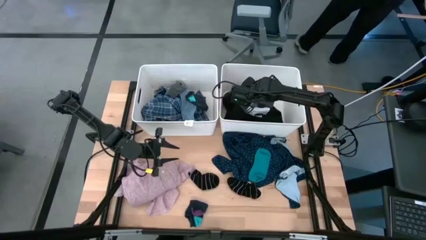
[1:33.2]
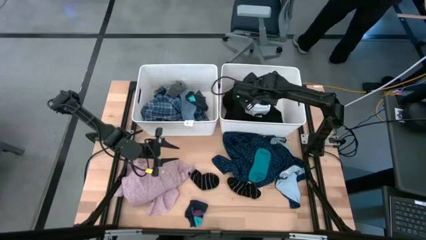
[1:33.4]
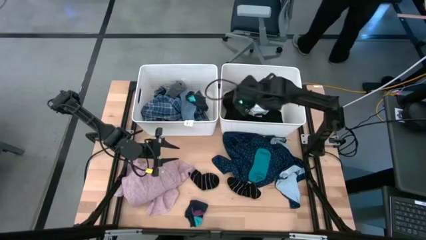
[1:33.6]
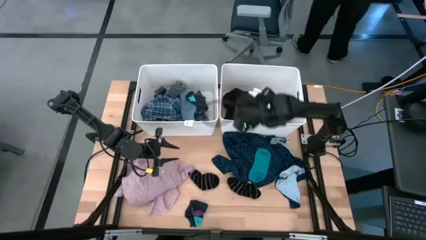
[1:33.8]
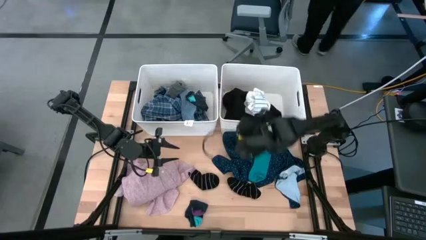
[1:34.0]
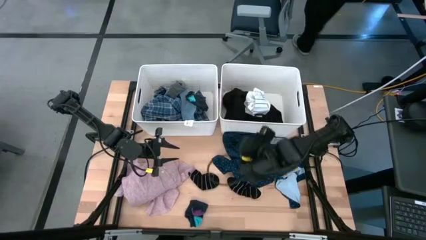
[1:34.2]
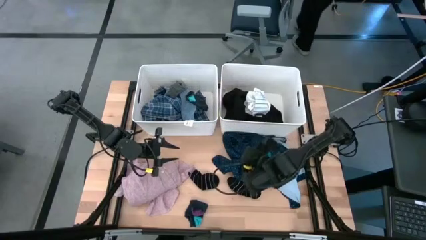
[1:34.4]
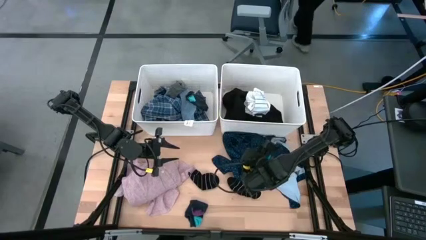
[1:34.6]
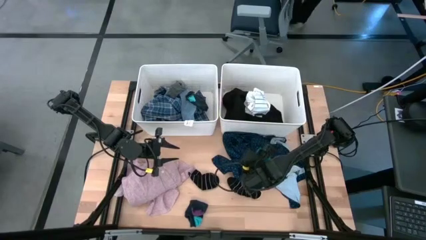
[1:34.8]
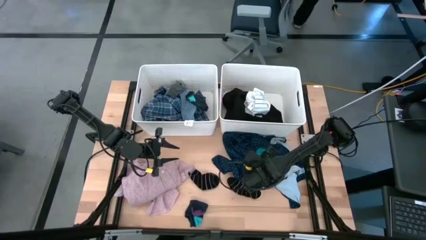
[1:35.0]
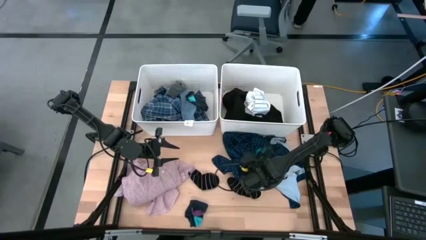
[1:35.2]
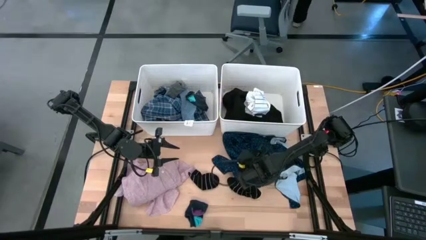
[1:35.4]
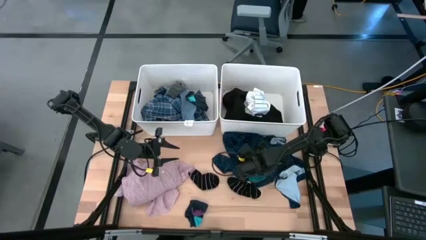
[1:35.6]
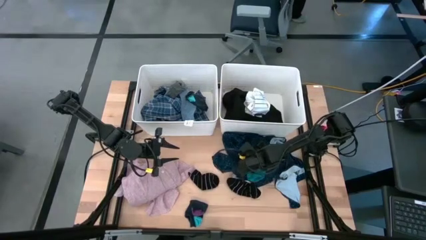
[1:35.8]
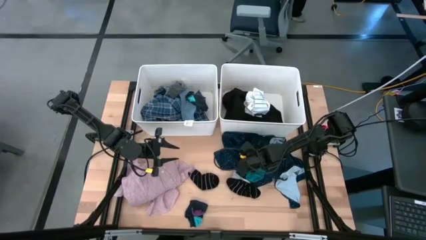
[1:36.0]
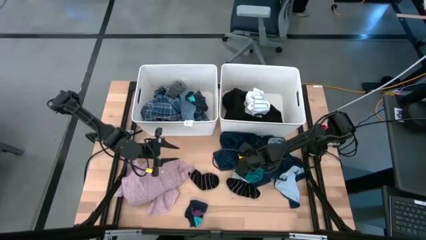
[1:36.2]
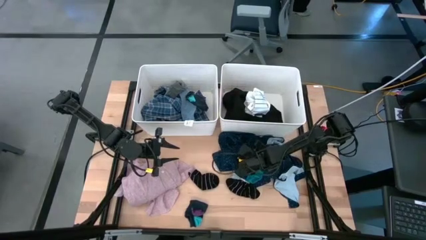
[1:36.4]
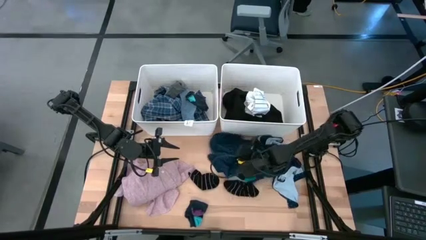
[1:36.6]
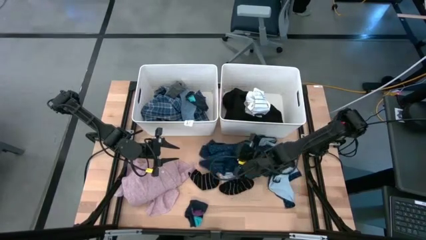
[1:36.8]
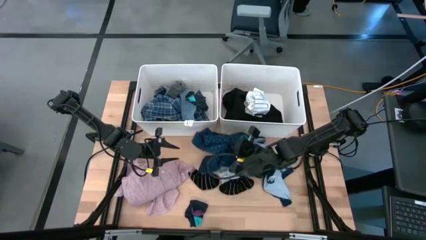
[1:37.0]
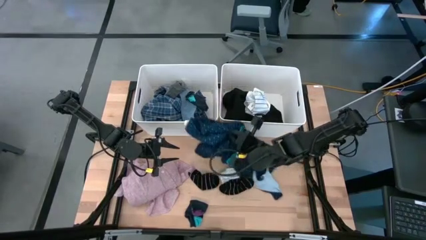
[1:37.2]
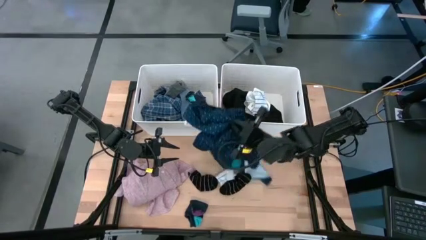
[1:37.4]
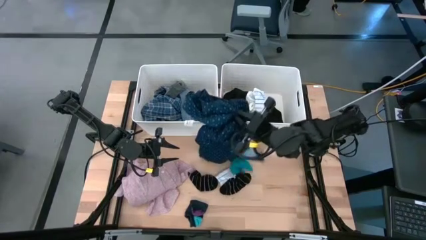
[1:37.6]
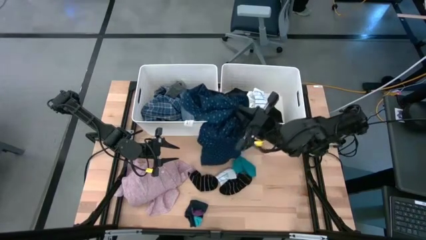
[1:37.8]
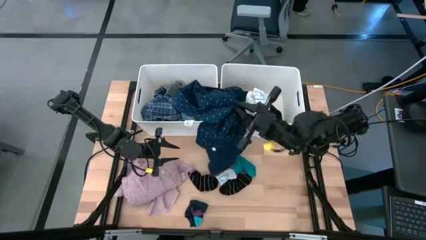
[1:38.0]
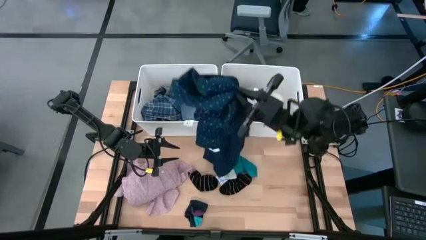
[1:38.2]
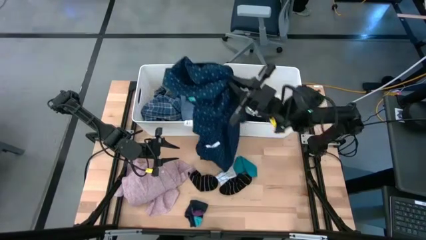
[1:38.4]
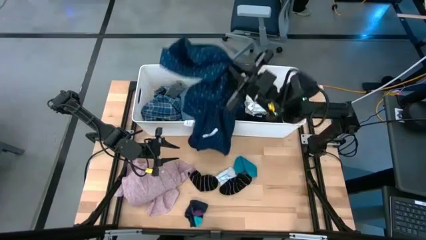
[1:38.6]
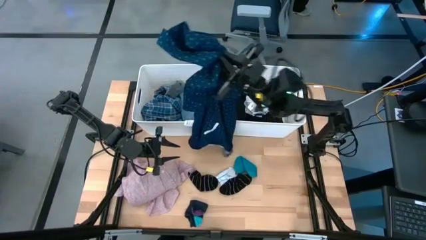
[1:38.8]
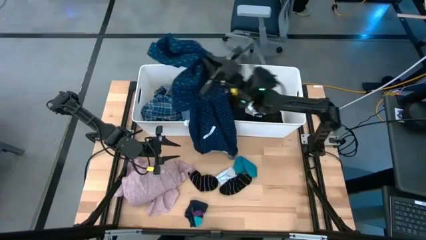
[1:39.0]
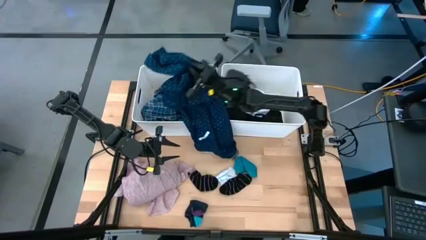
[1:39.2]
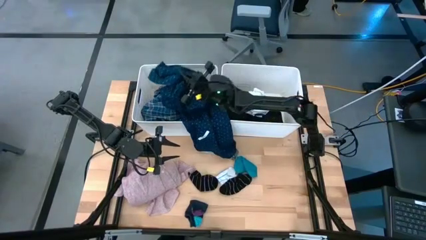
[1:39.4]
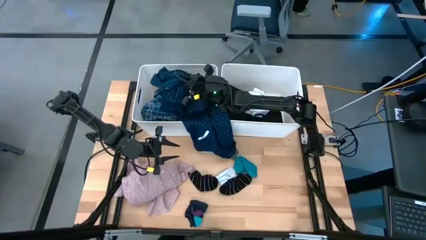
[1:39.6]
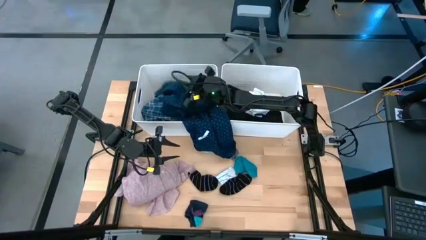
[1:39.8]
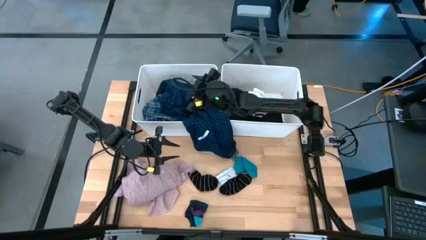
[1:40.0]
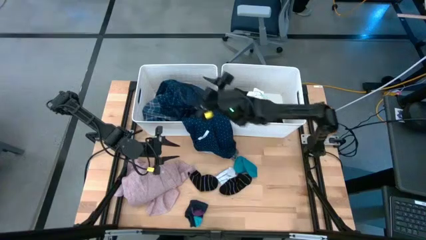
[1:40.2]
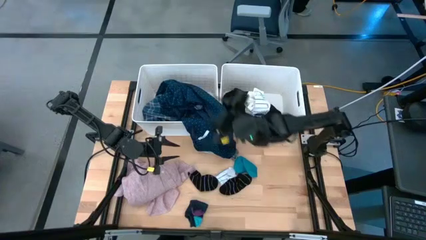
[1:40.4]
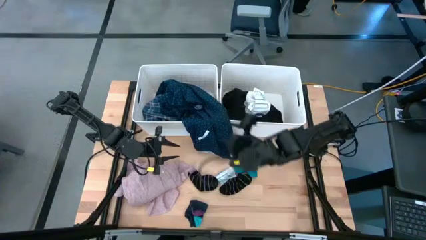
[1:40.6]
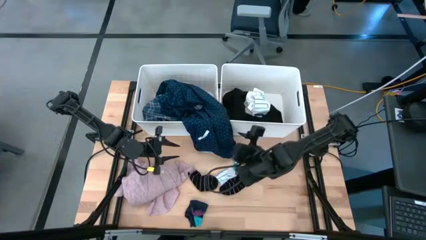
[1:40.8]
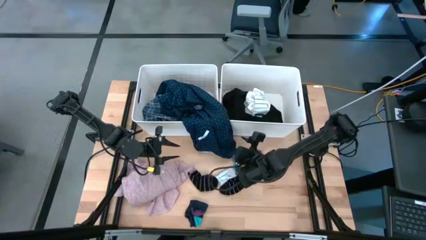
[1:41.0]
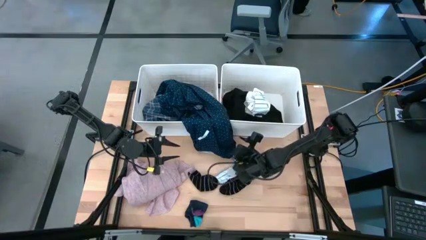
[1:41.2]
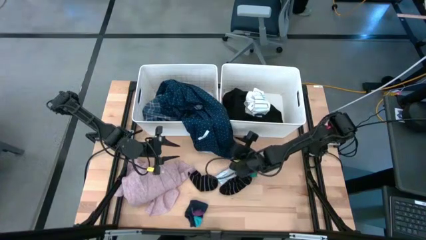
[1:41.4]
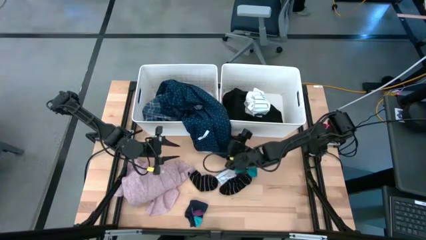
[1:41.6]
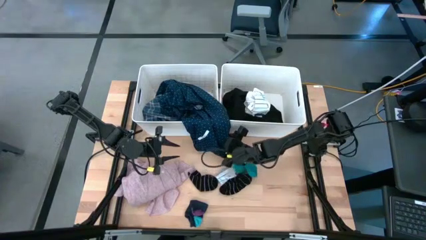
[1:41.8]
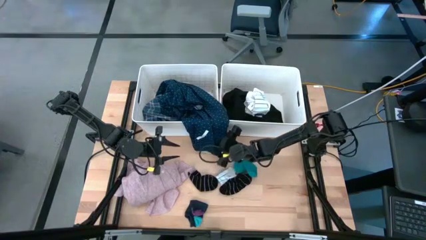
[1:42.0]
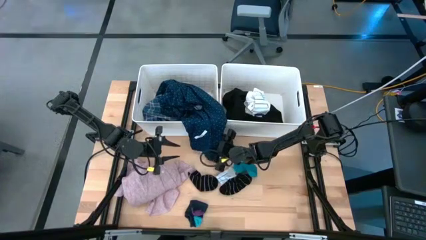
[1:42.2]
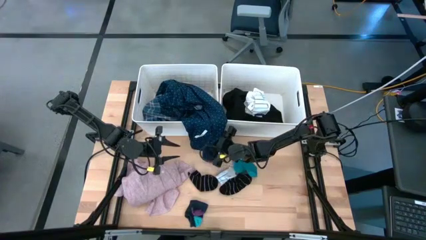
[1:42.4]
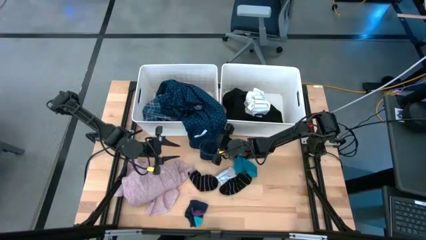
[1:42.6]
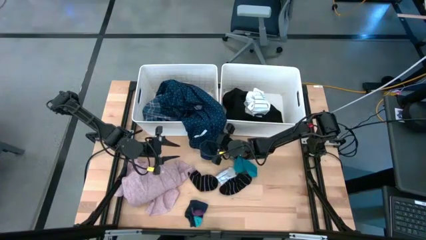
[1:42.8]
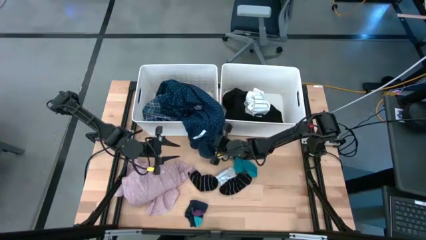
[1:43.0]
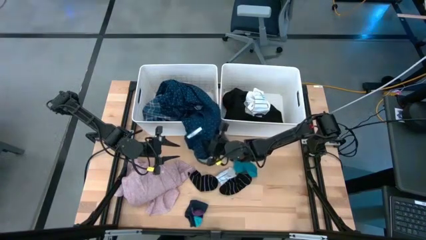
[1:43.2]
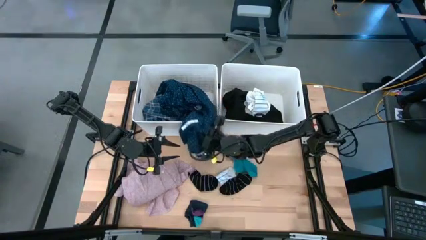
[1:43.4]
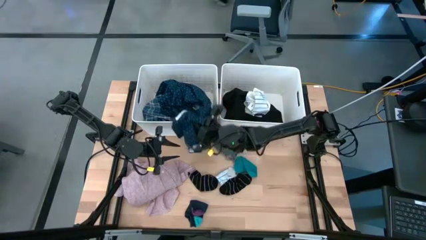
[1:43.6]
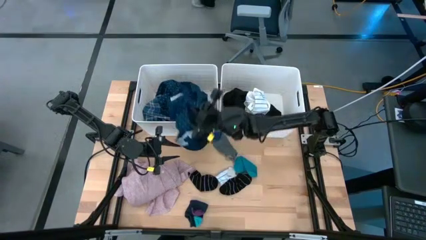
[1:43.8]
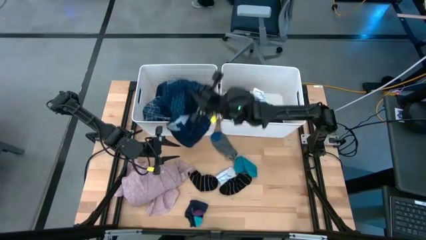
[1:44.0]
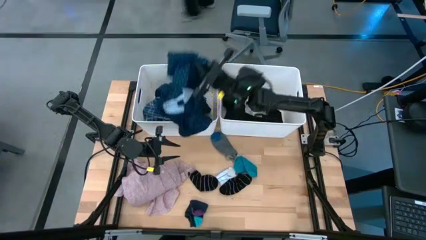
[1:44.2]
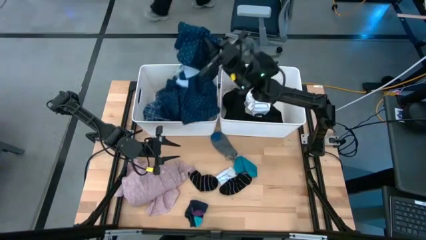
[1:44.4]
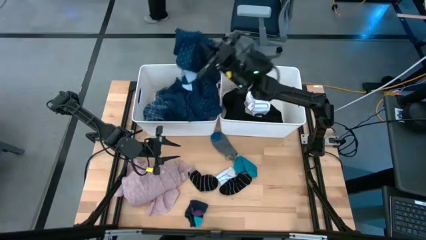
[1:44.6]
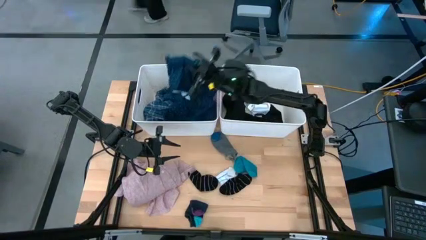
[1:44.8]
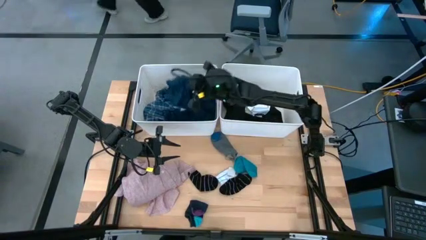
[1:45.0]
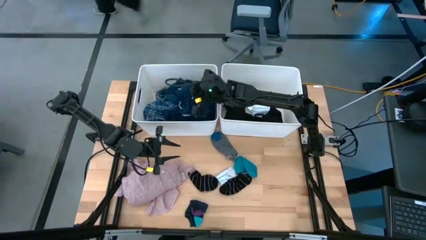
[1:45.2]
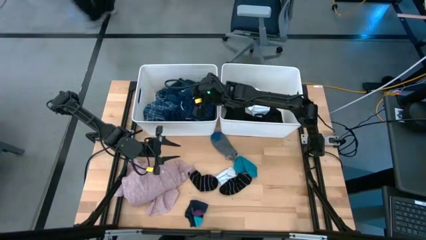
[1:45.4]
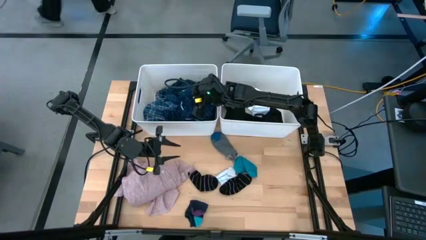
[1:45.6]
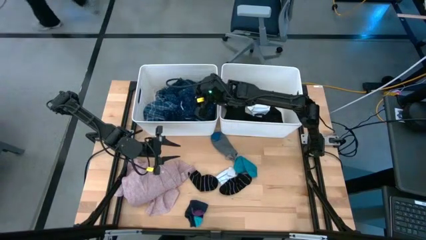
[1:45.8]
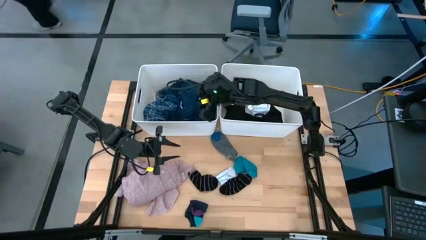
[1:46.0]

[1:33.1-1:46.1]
Task: Sort clothes
Put the dark blue shirt into the left white bin

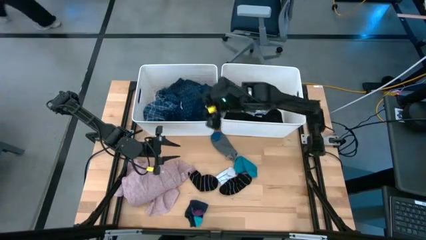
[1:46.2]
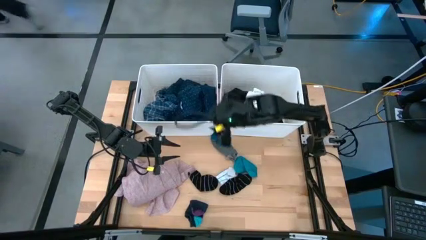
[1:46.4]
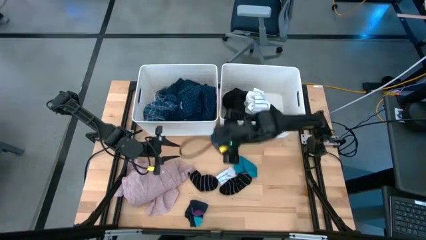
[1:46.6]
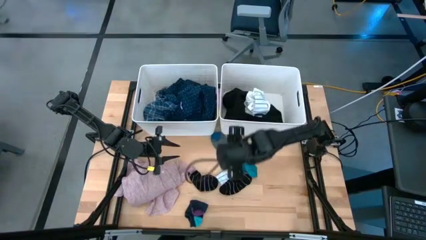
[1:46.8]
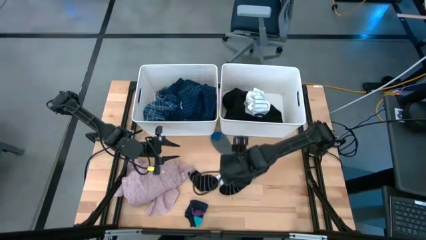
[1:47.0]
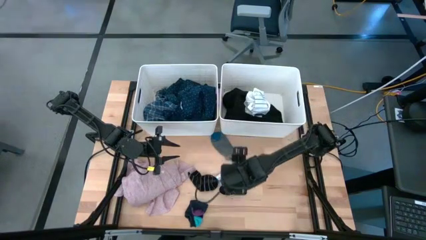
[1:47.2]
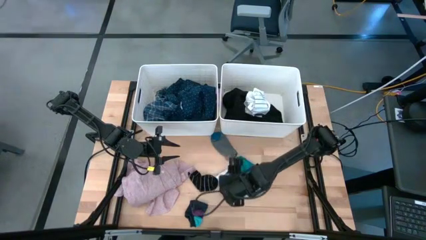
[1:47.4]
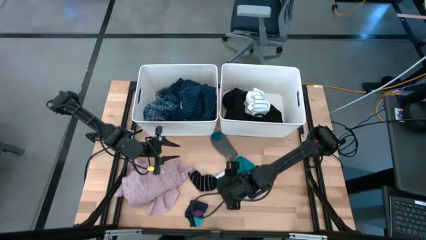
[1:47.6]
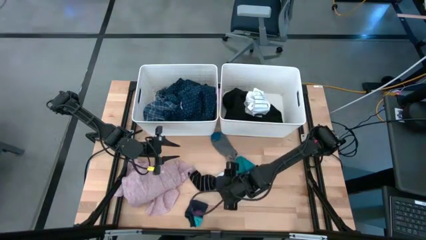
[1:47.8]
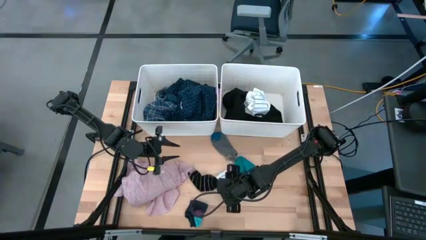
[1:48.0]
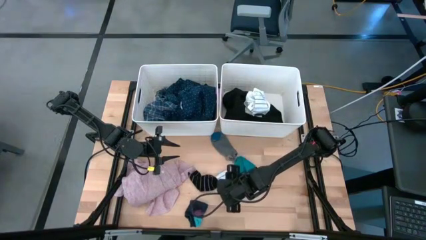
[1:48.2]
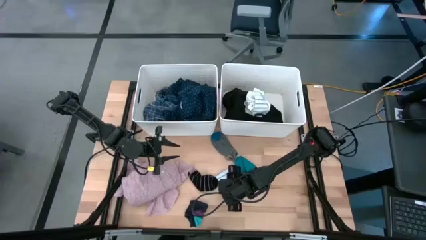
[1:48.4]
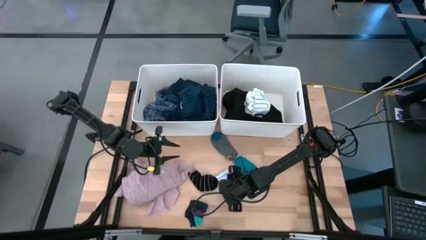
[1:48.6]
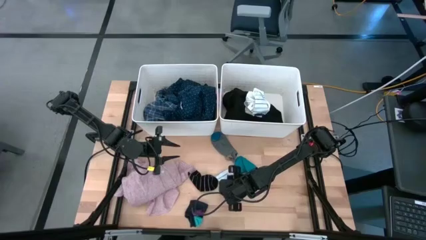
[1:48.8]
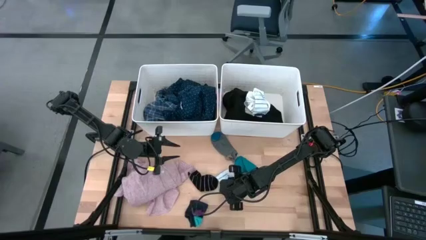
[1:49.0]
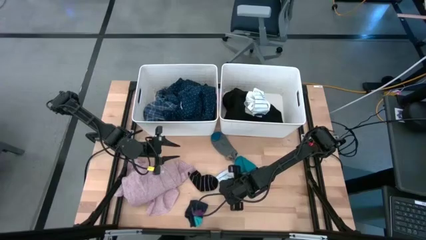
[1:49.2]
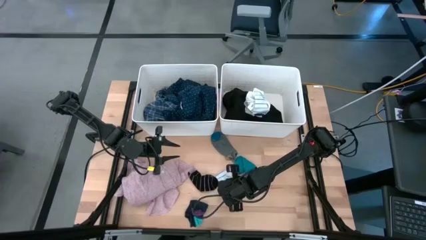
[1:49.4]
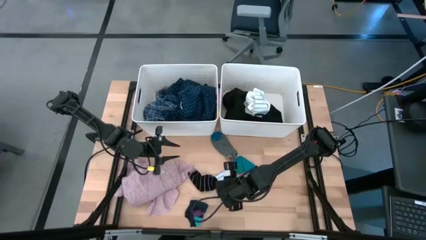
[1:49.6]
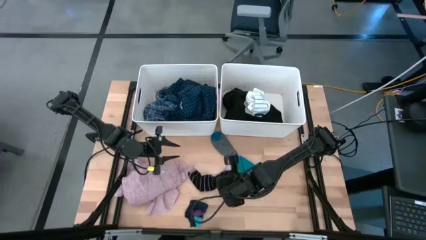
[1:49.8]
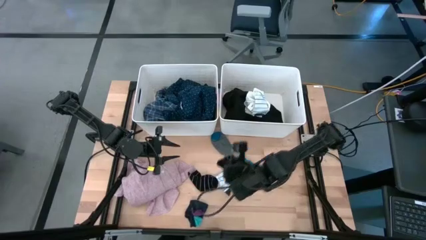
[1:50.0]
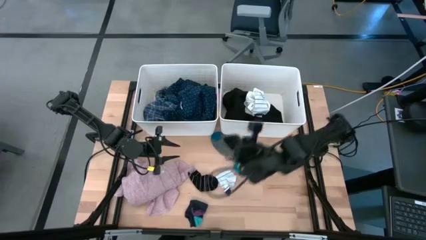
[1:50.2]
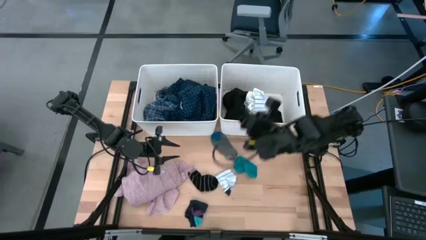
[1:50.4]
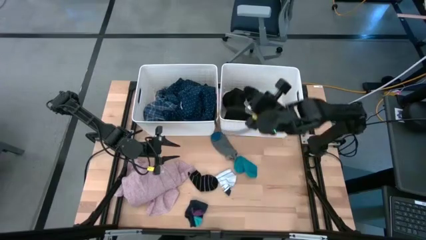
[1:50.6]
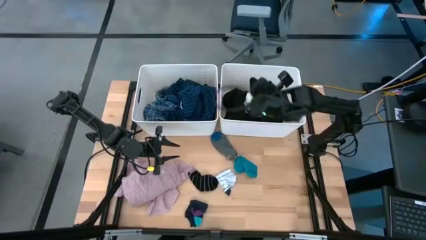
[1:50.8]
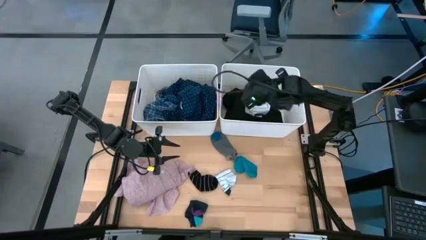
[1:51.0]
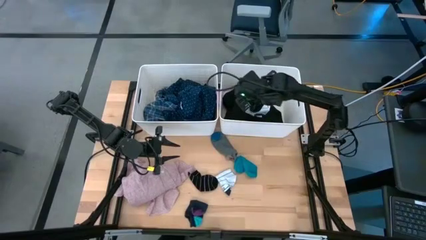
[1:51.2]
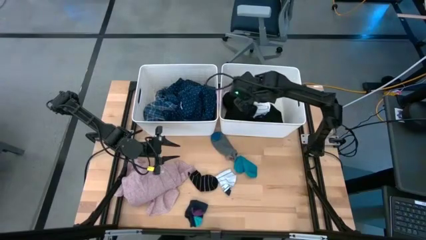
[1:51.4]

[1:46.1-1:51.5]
Put the right black sock into the right white bin
